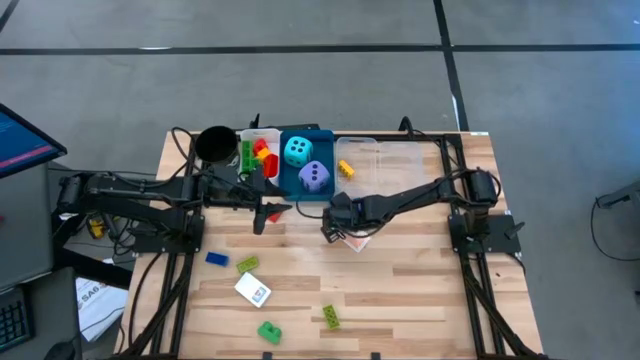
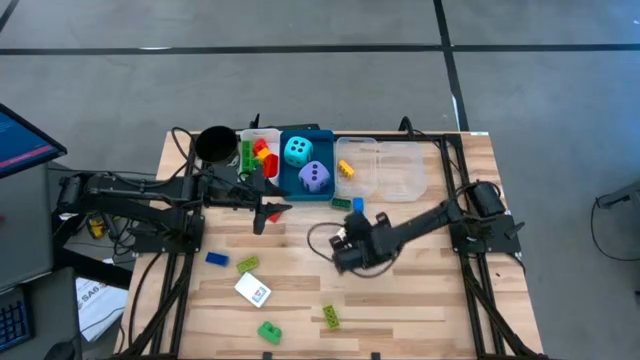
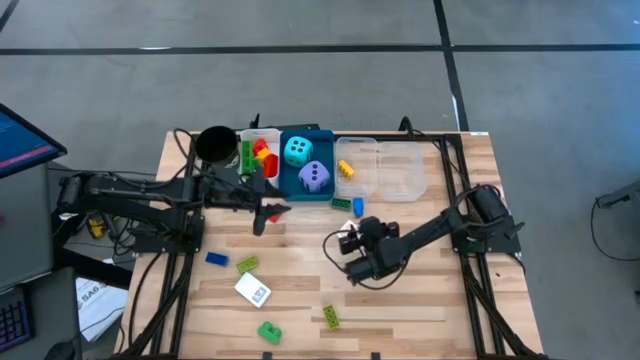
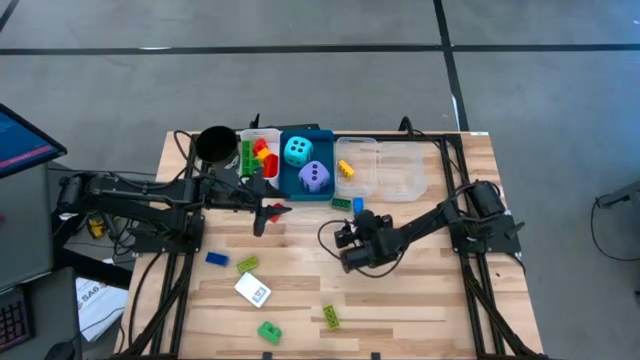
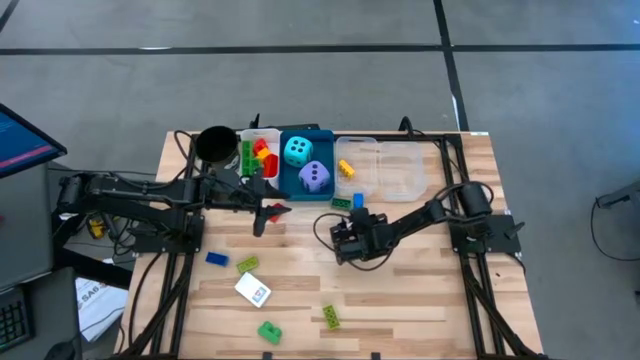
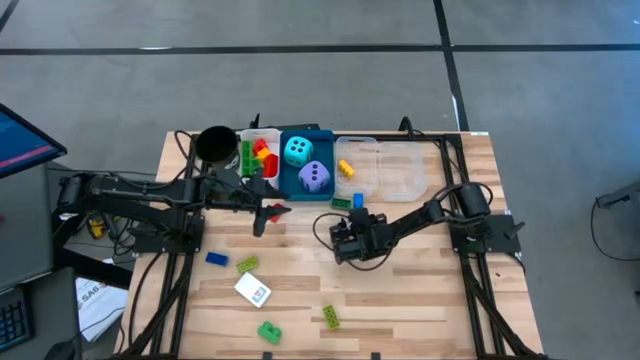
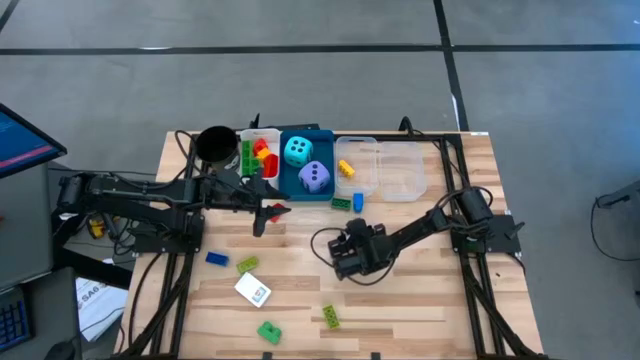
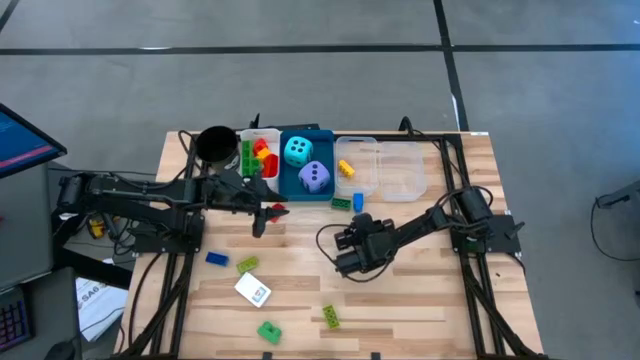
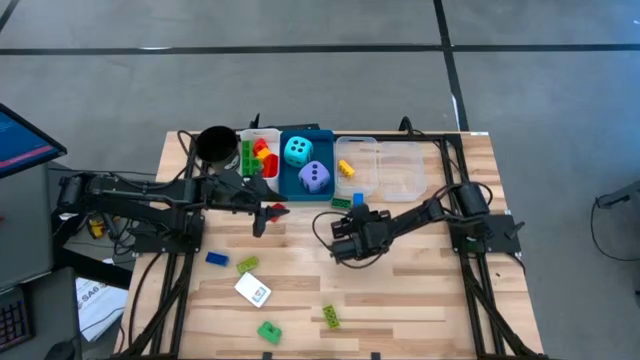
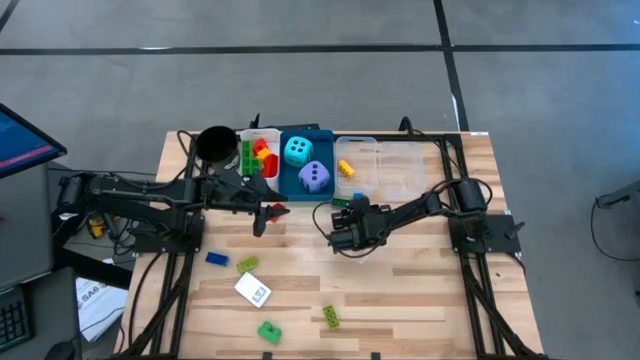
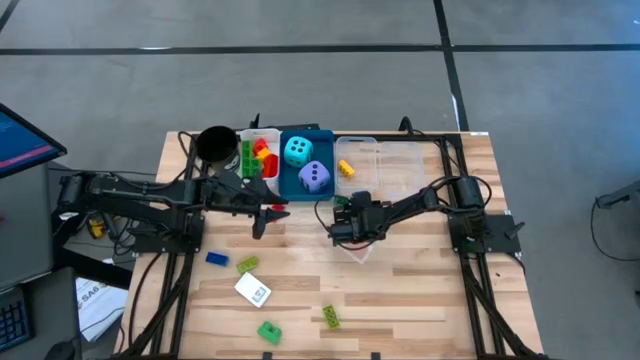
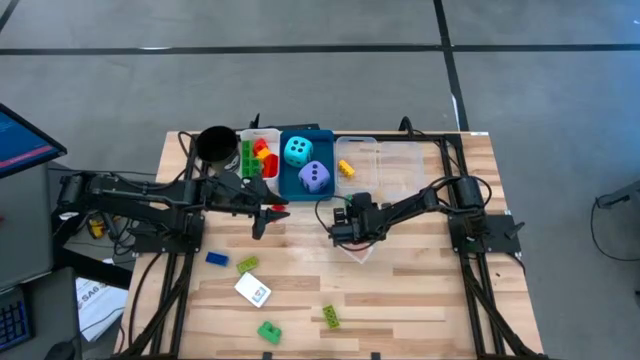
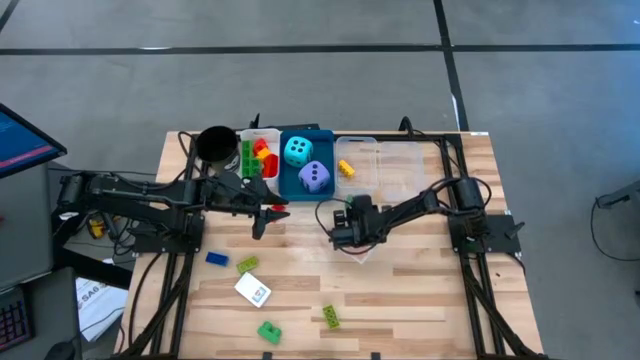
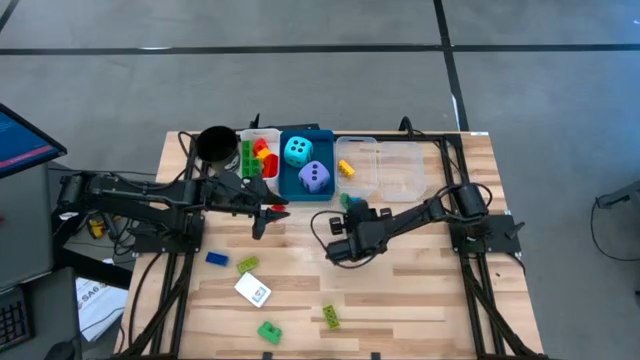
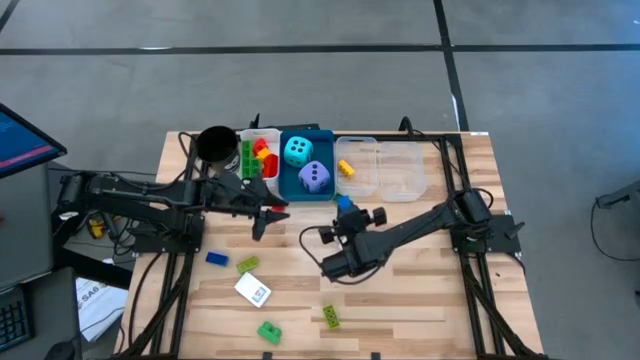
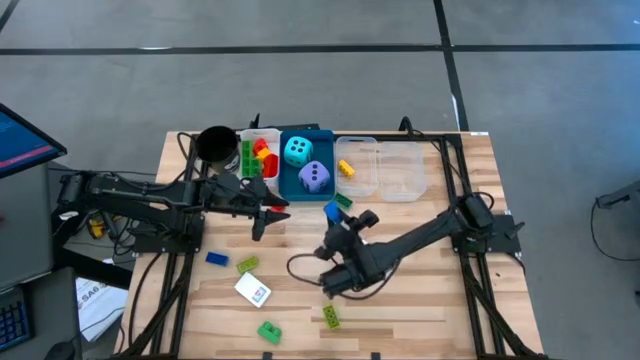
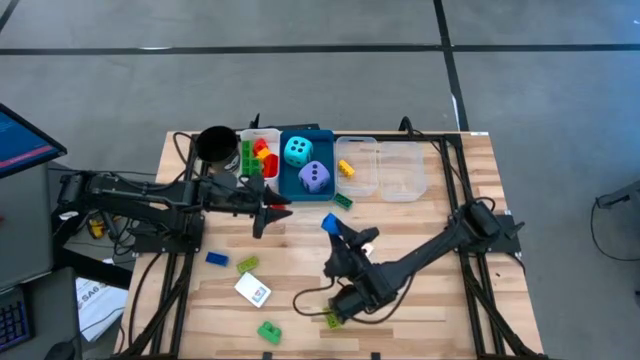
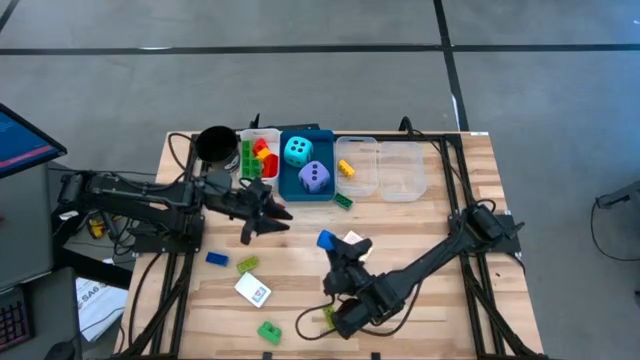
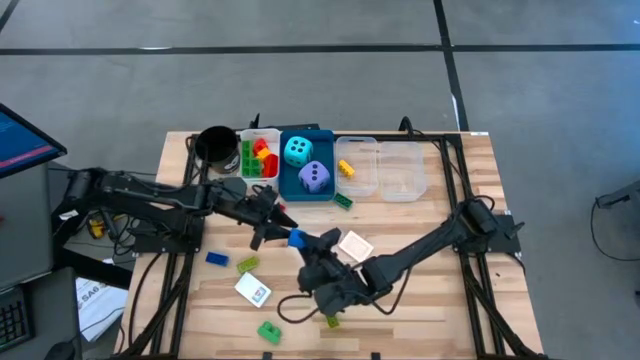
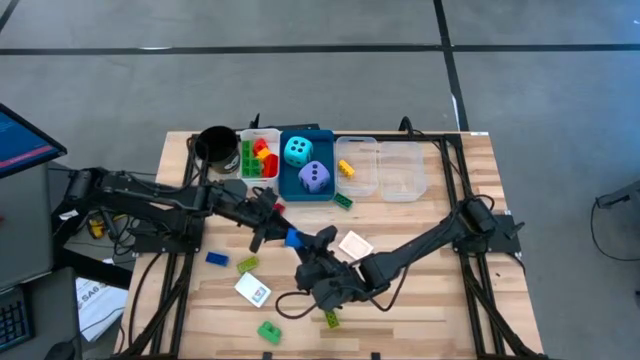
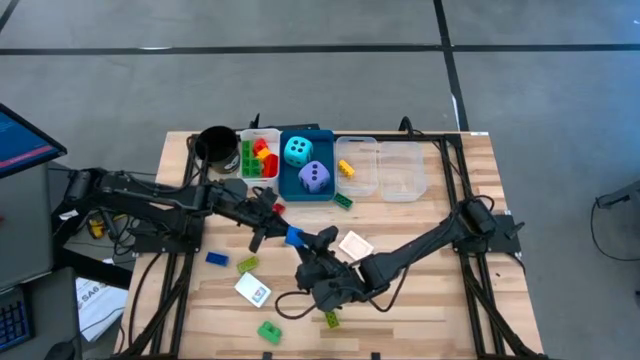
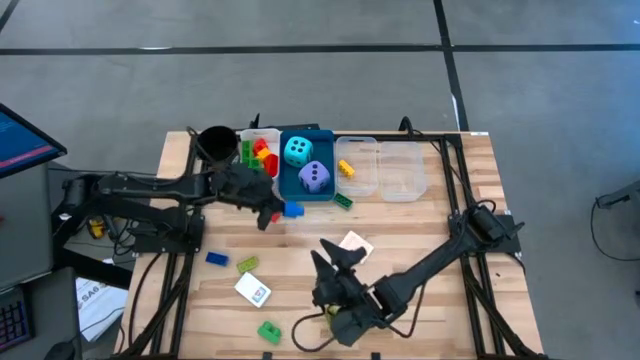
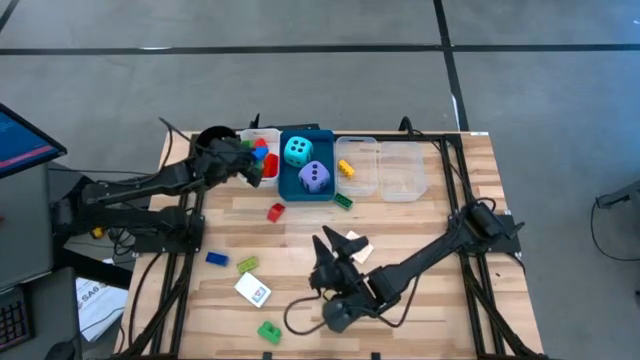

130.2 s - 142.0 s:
Task: Pick & Place Toys
Put the large blue game piece into the white bin

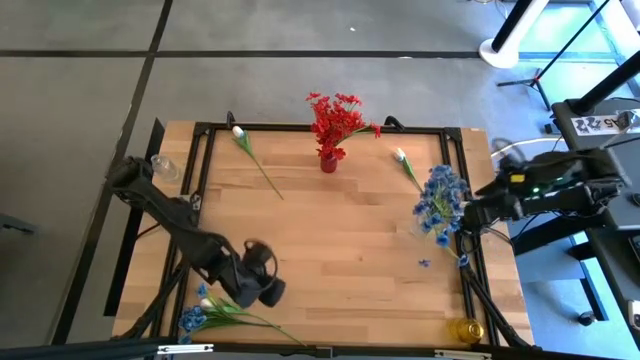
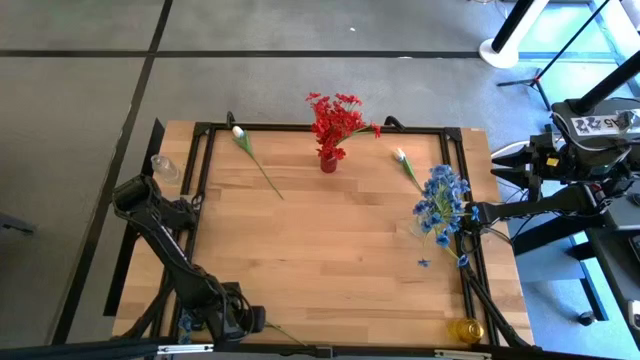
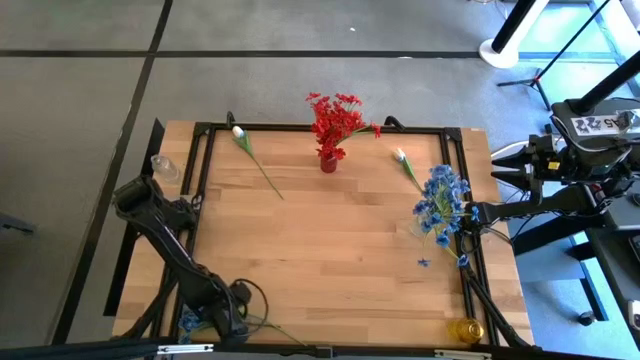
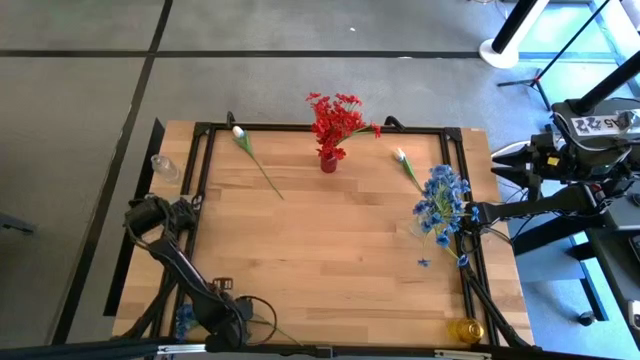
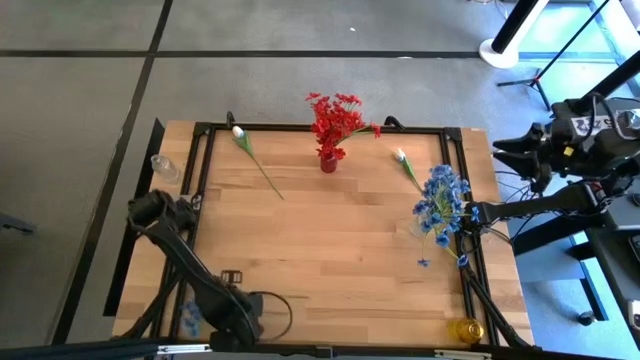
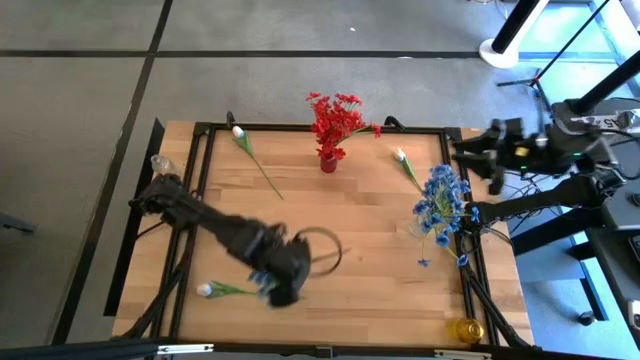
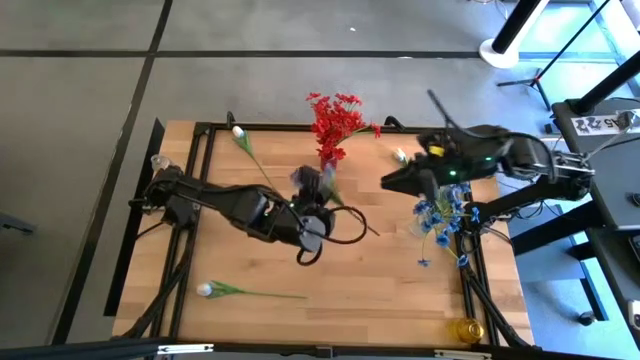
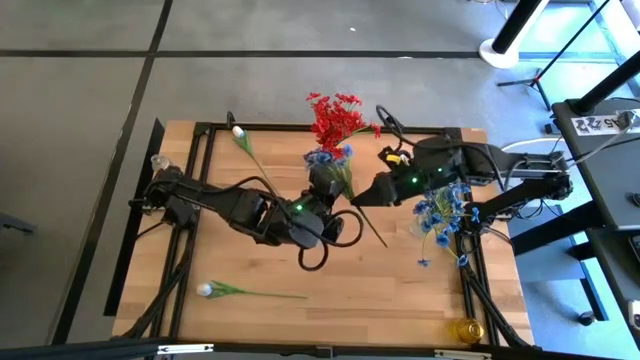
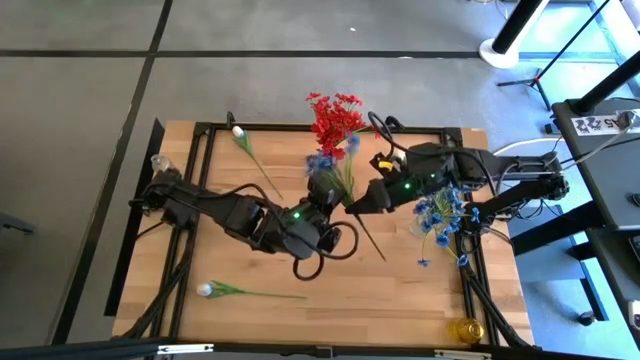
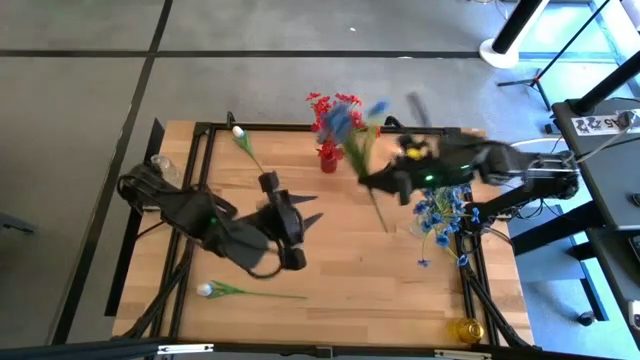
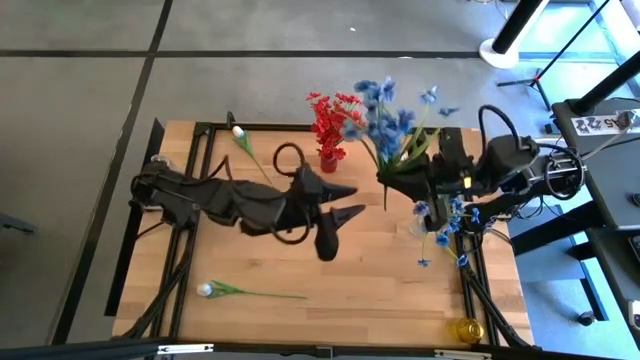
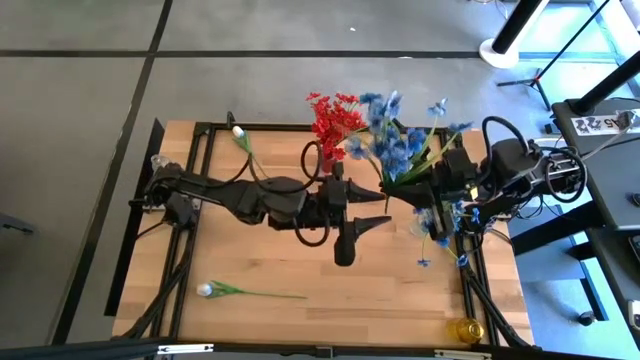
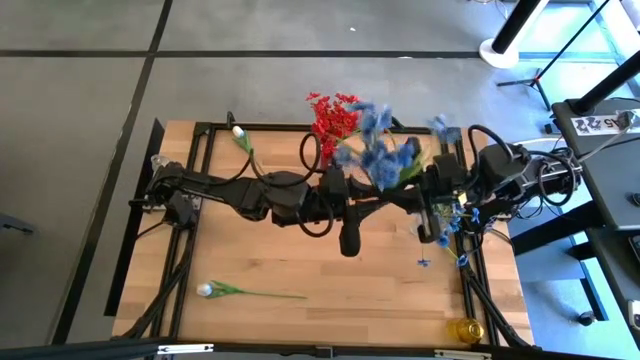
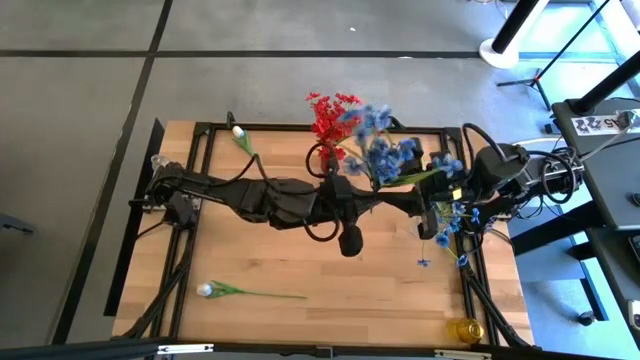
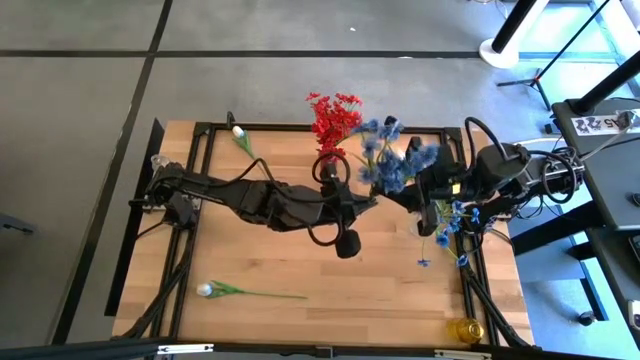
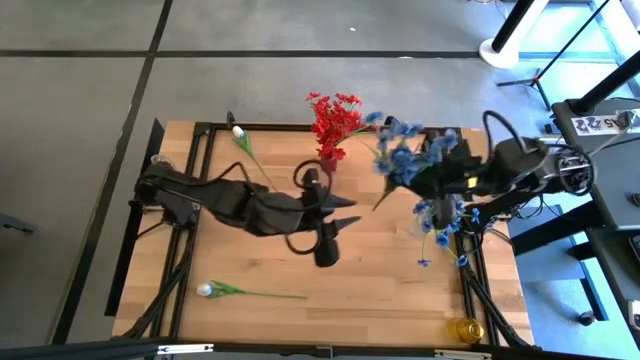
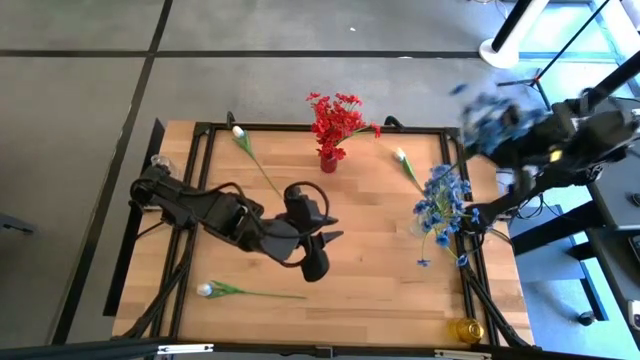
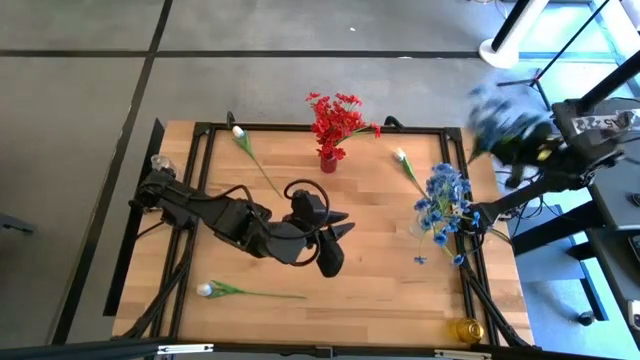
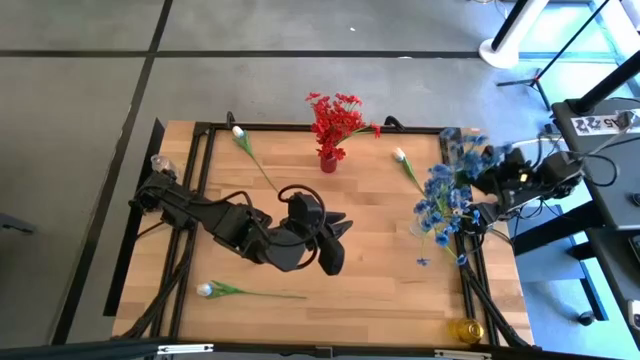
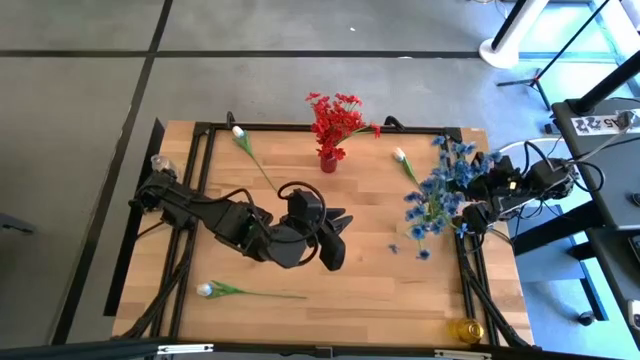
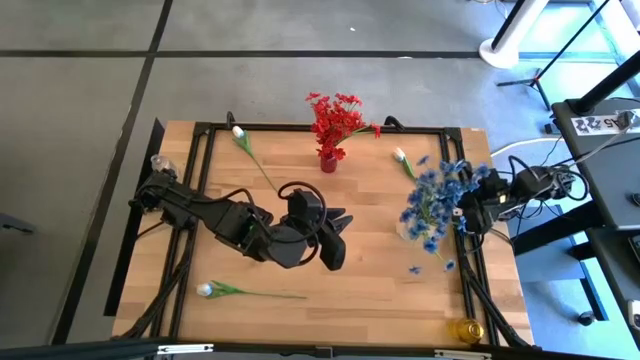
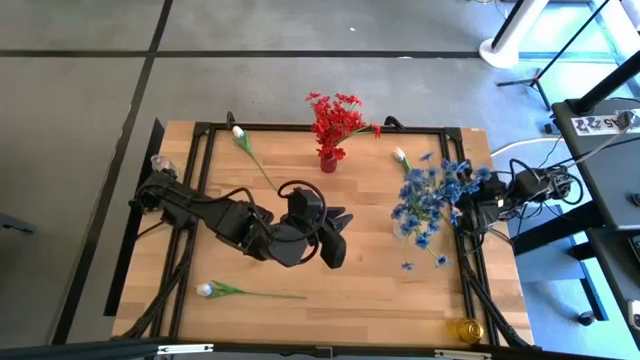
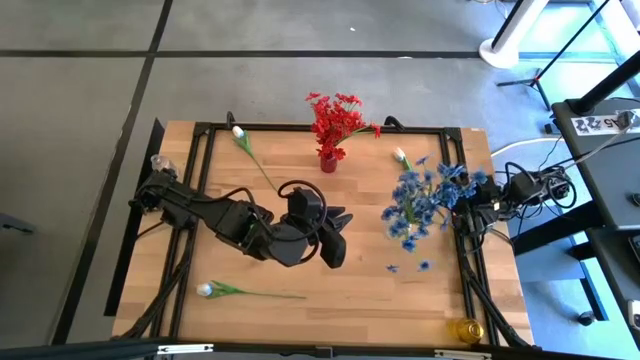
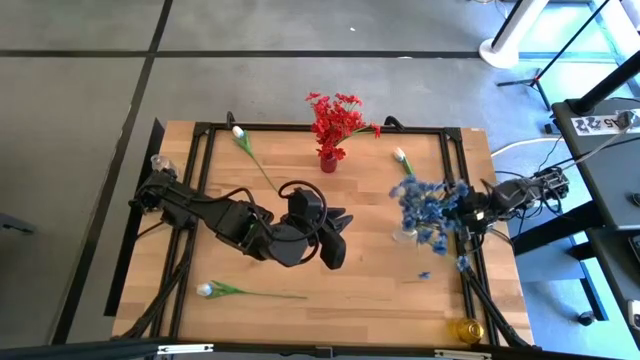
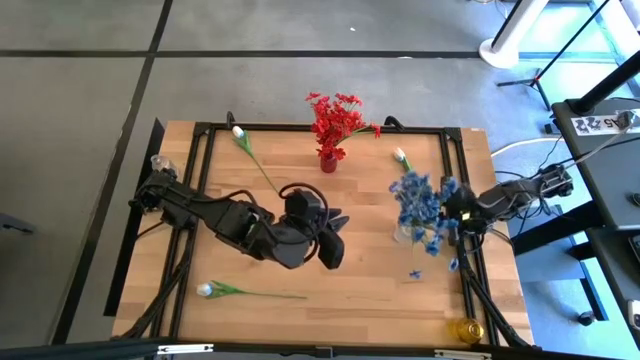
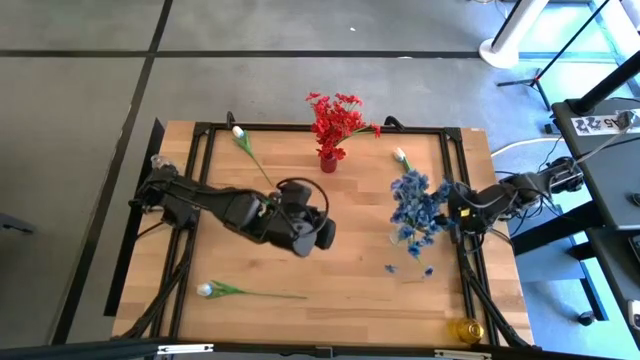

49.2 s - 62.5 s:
Task: Sort flowers into vase by color
Put the blue flowers into the transparent vase
